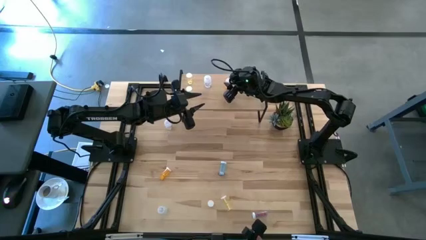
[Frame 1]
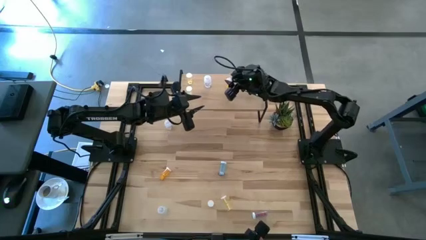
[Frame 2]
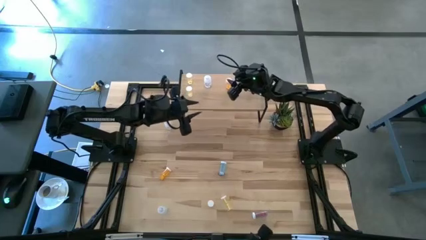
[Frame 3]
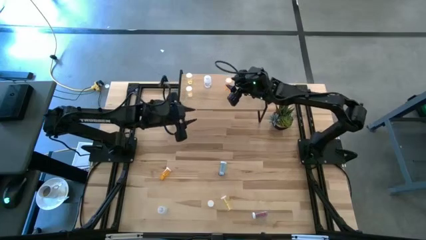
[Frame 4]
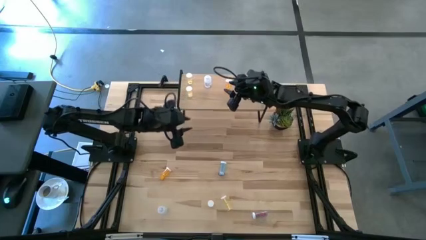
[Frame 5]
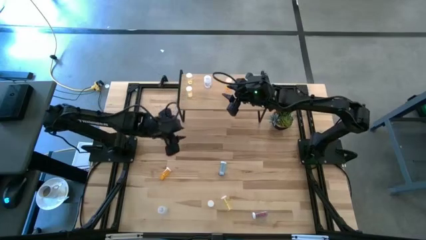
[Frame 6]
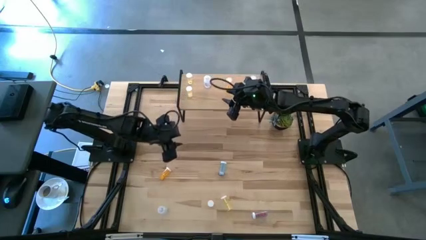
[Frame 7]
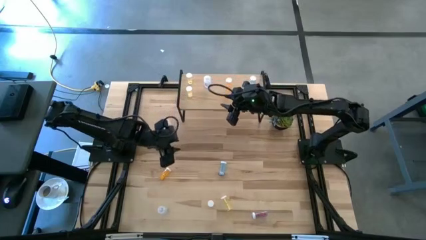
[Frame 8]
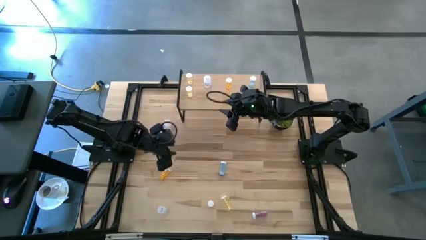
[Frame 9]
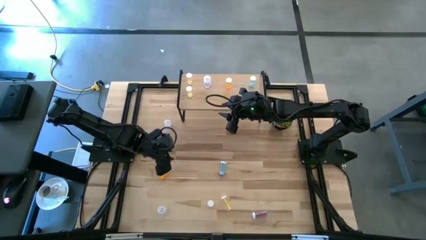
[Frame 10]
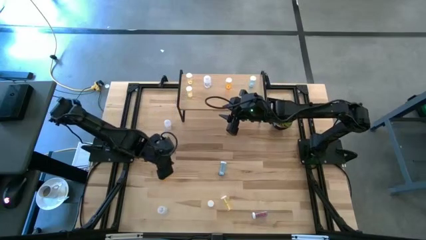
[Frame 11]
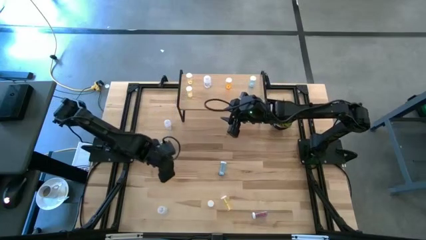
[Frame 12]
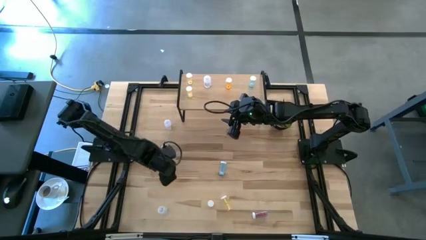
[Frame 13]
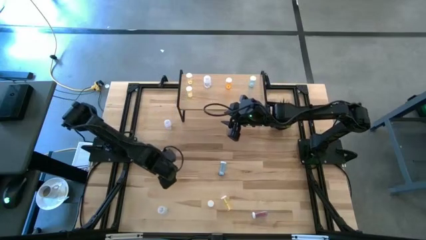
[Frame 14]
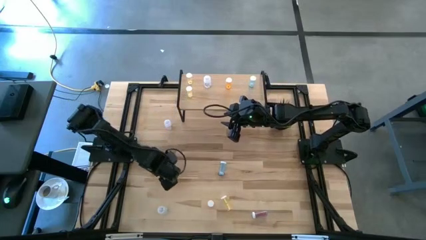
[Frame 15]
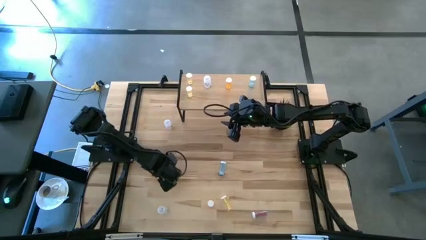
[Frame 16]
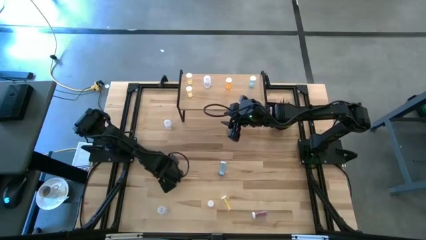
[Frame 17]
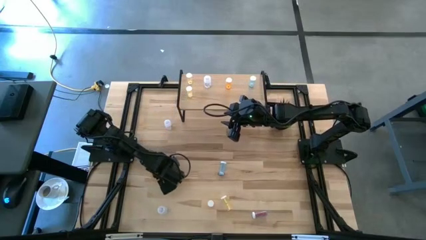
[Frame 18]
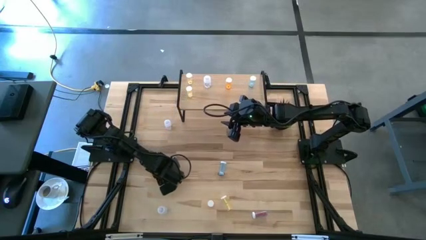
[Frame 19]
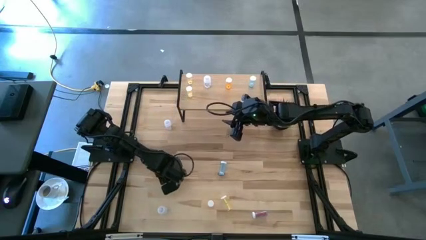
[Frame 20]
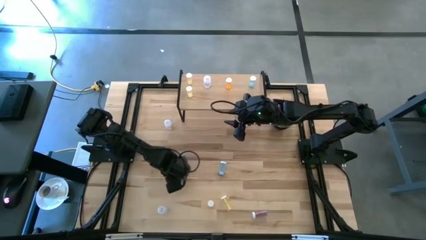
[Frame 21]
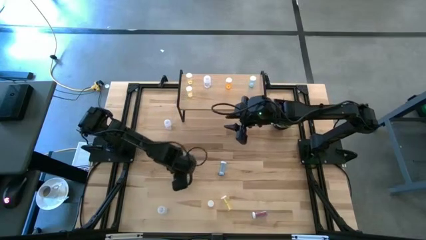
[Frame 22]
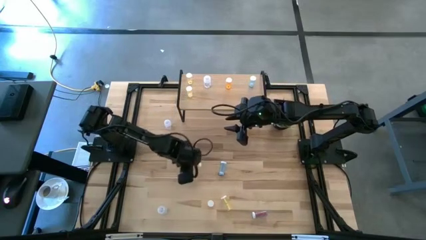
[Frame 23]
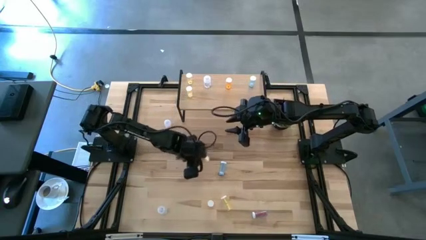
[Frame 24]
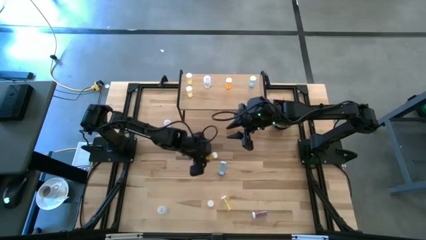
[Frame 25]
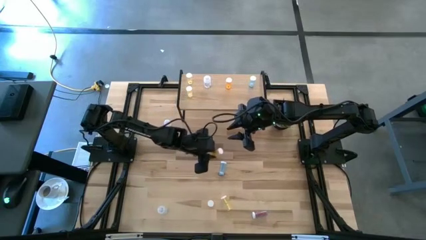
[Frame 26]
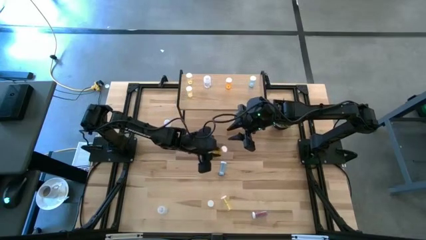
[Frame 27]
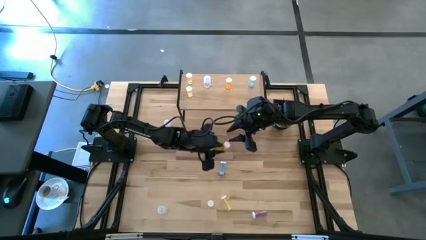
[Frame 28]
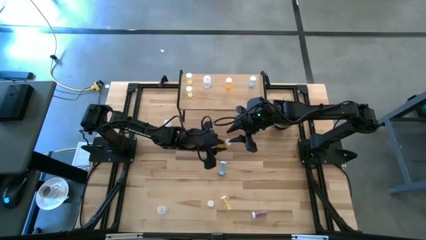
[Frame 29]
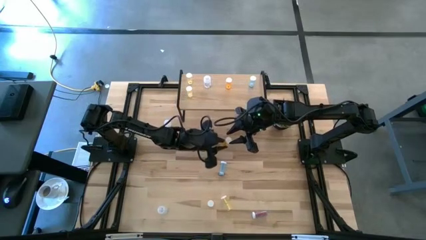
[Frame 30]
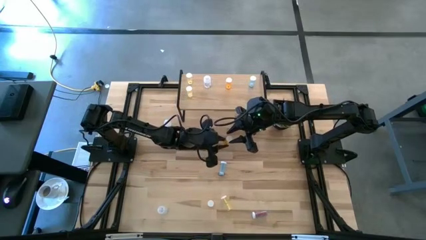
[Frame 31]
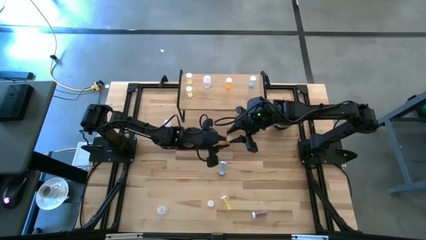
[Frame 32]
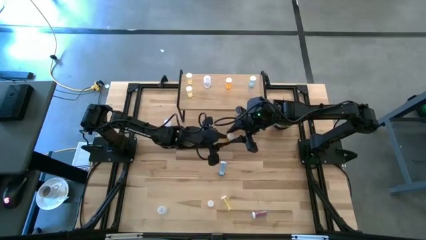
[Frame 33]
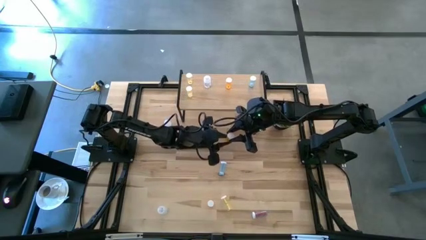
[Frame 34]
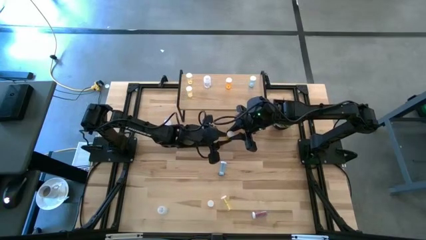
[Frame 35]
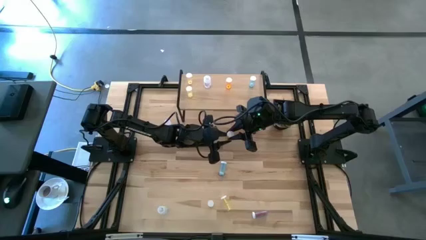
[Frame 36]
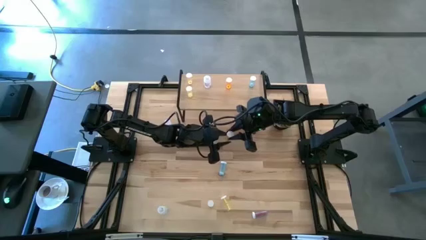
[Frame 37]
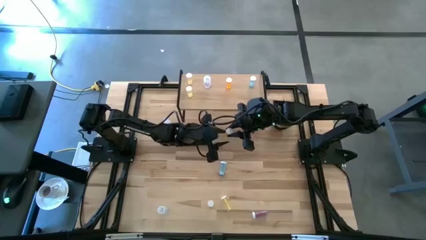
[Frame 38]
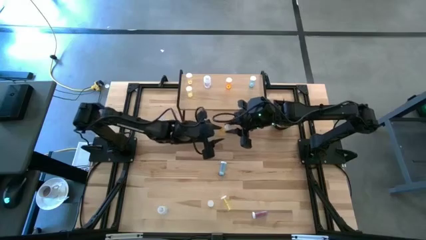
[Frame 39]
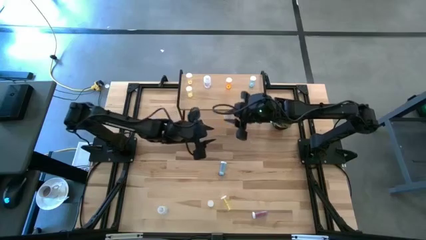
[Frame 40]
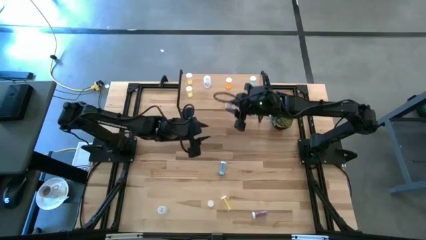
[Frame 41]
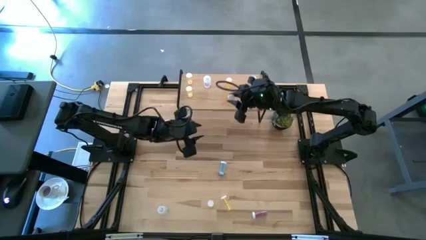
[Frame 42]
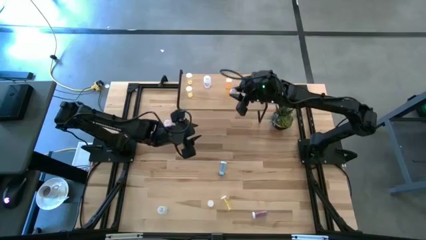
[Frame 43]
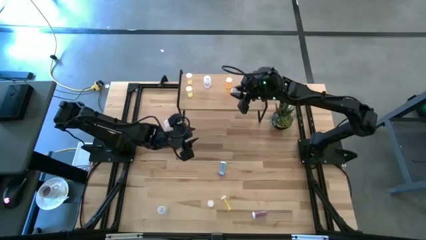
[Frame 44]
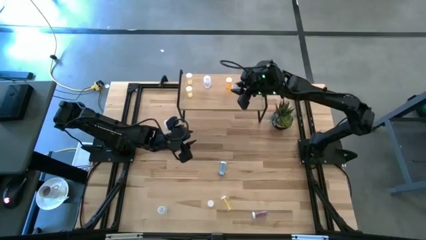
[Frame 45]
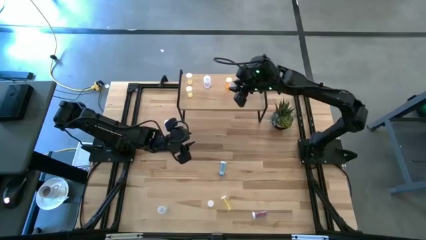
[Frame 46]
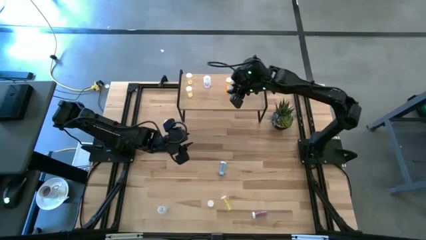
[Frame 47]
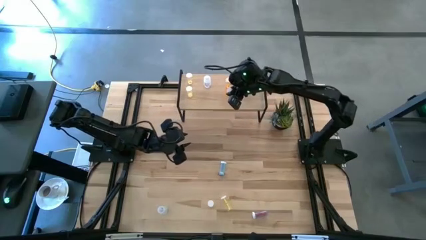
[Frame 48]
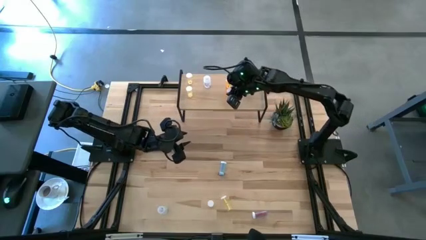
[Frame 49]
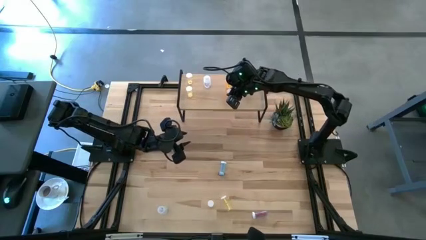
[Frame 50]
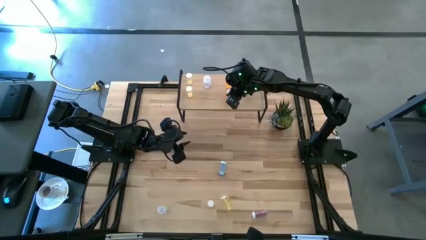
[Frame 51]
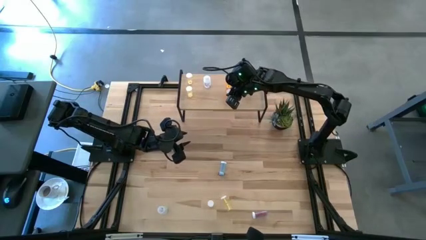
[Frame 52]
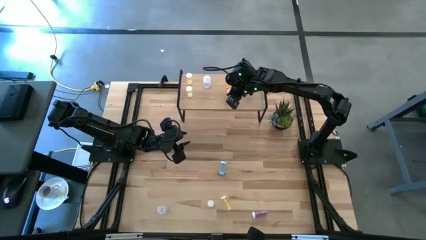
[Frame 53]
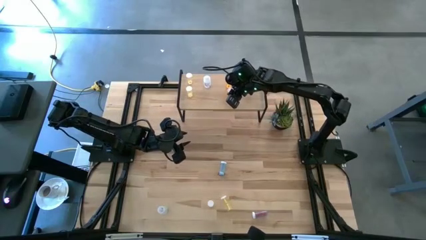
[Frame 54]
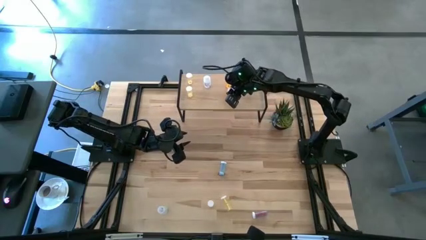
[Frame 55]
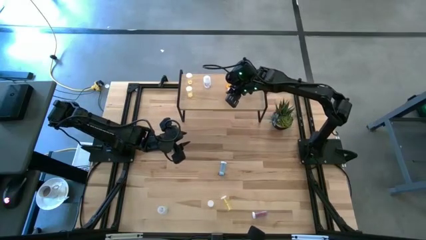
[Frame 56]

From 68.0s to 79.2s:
Task: Pick and place medicine bottles onto shelf by color
Put the left orange pill bottle on the shelf aligned with the other orange pill bottle

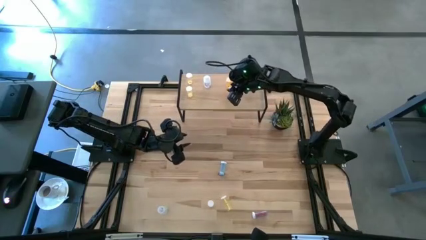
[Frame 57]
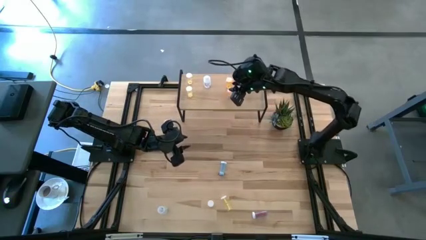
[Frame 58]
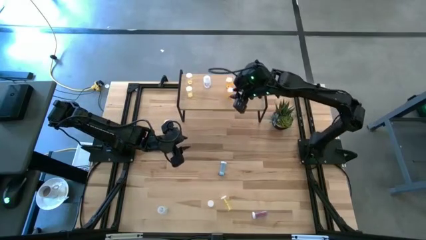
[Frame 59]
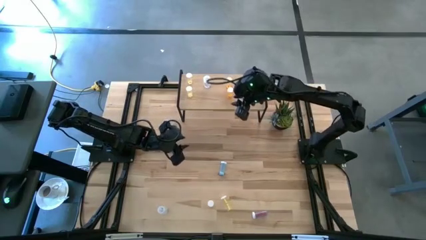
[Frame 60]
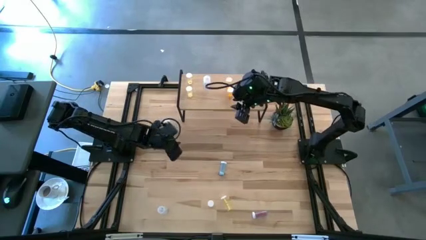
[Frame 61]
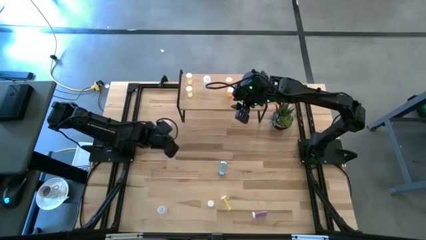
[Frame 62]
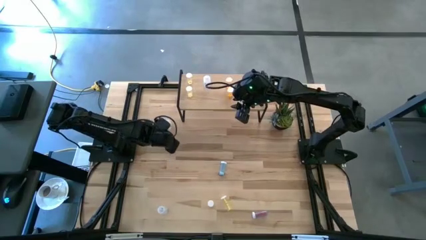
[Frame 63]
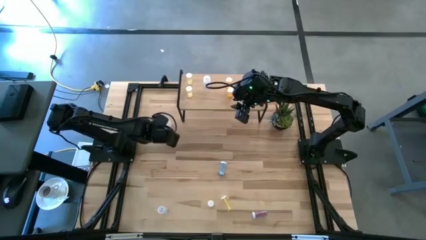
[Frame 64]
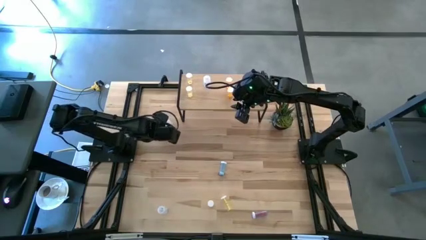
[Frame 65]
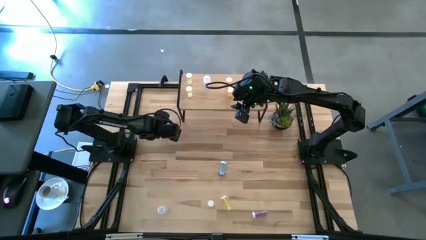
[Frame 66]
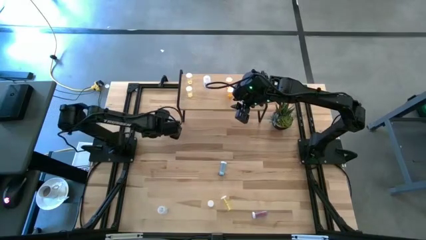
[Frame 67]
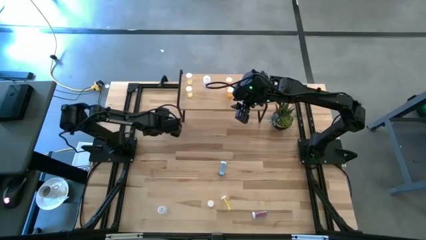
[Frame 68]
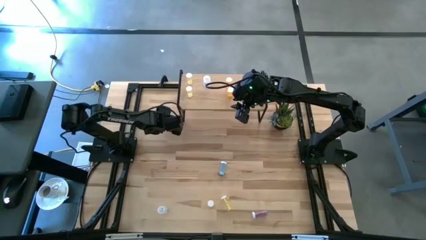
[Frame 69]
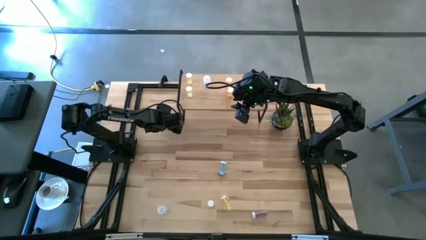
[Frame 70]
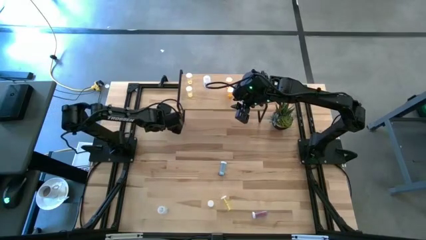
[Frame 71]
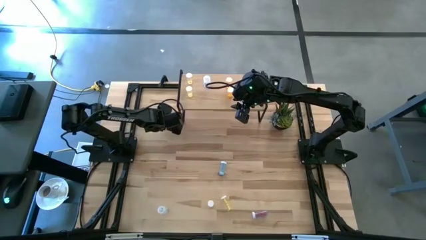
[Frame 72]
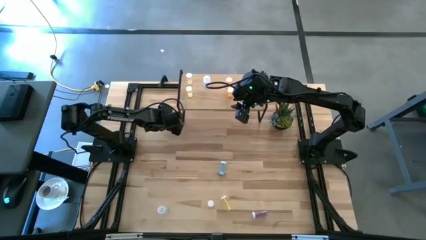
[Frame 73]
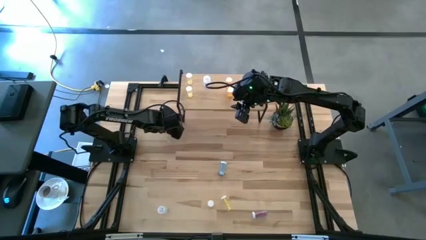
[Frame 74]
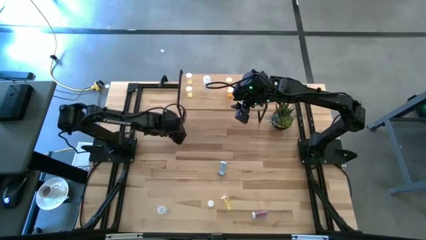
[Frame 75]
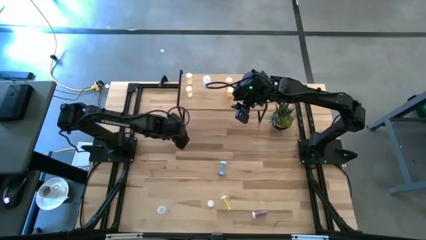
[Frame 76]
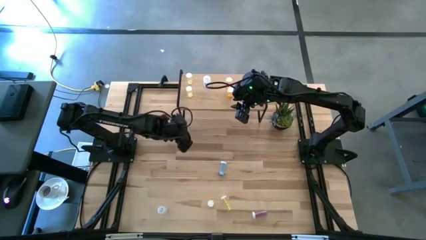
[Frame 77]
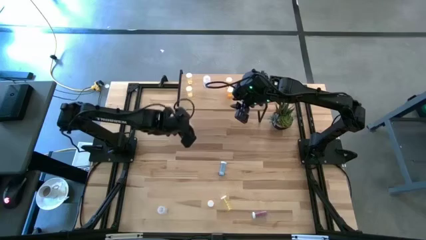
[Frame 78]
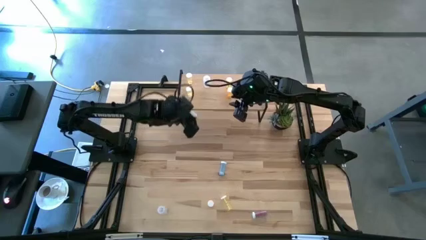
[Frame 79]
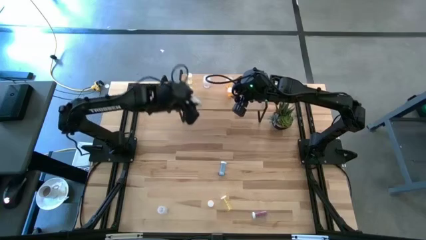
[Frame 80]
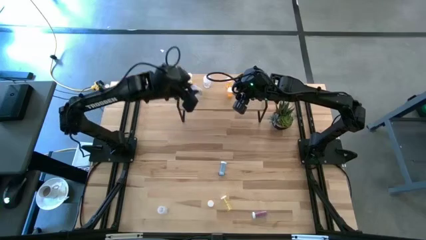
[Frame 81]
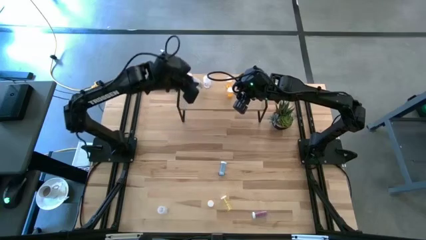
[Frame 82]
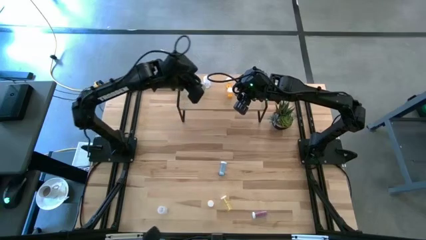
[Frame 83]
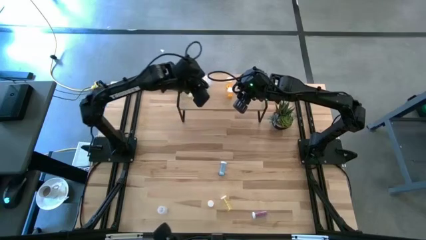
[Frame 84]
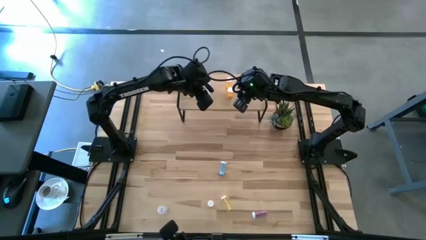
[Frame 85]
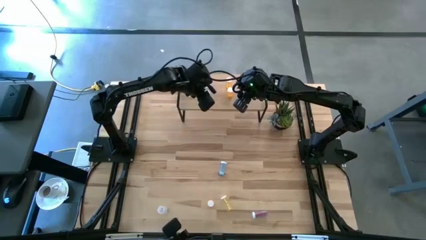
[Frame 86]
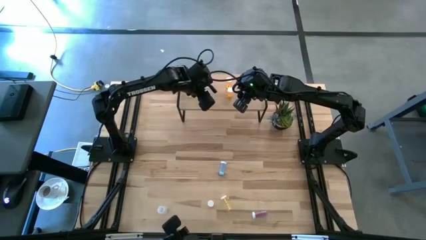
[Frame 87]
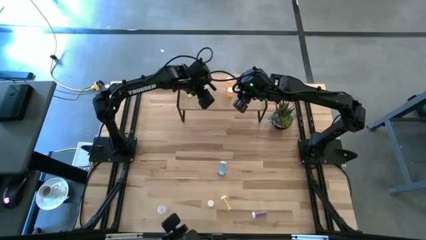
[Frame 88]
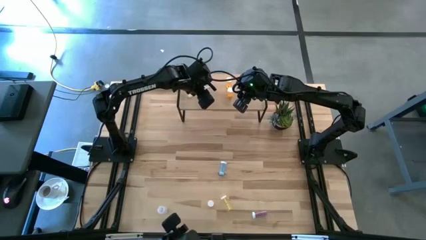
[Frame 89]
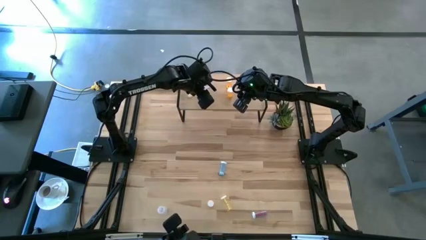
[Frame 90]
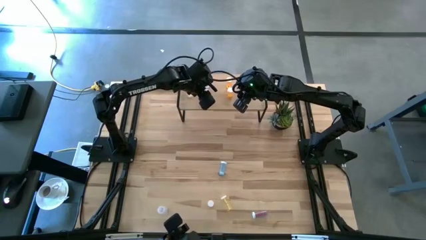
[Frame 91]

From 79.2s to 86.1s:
Put the top transparent pill bottle on the shelf aligned with the other transparent pill bottle
